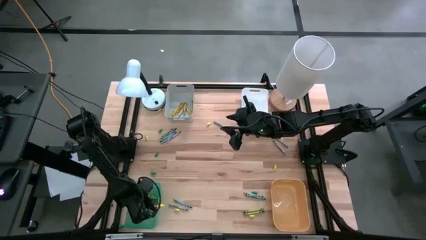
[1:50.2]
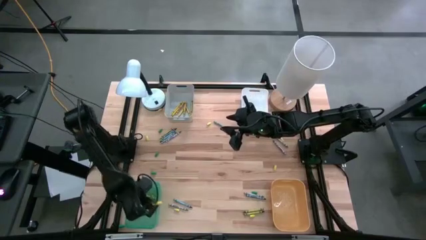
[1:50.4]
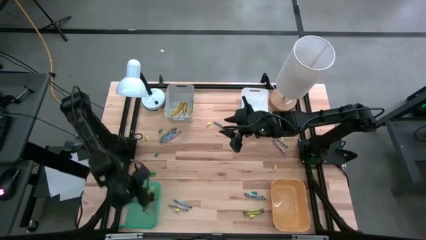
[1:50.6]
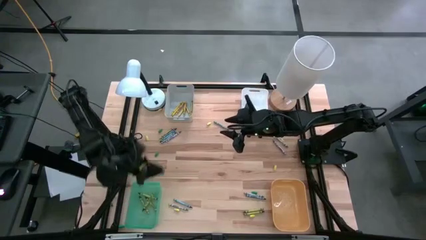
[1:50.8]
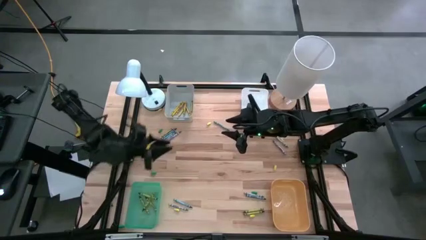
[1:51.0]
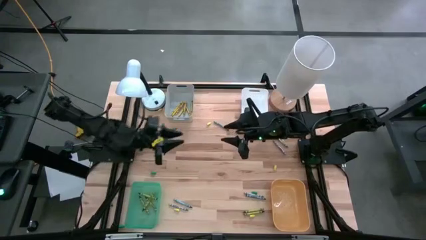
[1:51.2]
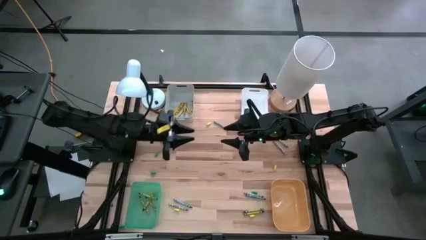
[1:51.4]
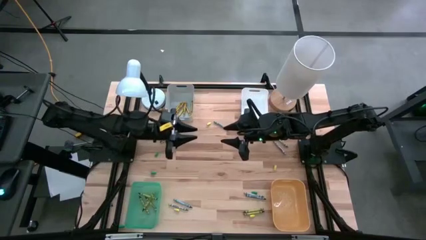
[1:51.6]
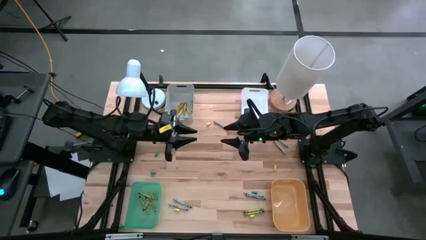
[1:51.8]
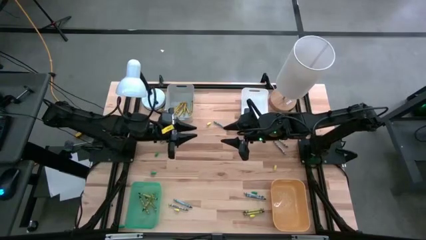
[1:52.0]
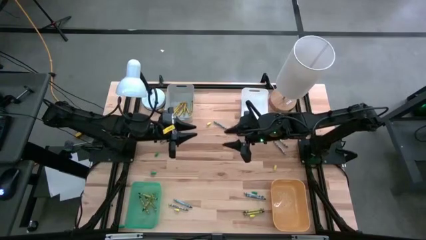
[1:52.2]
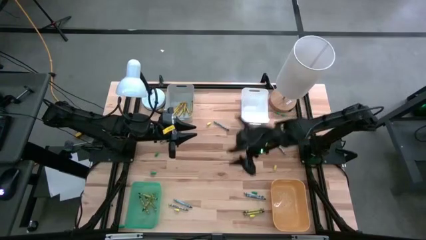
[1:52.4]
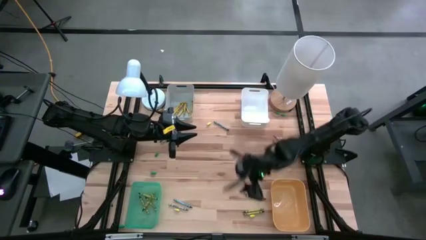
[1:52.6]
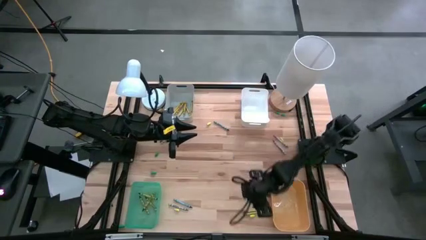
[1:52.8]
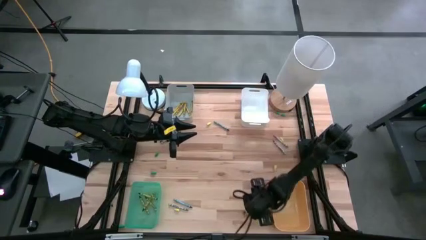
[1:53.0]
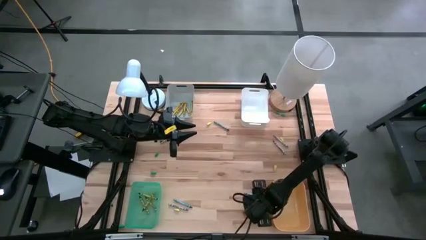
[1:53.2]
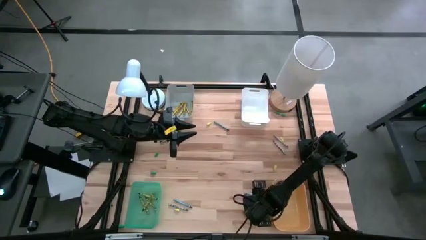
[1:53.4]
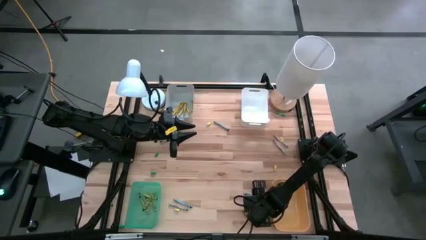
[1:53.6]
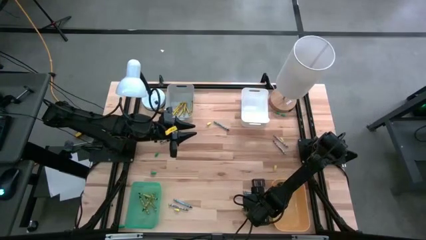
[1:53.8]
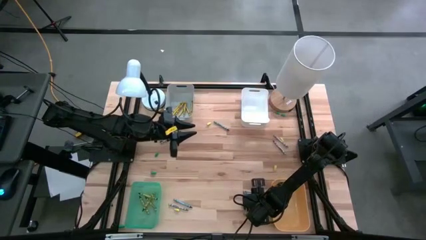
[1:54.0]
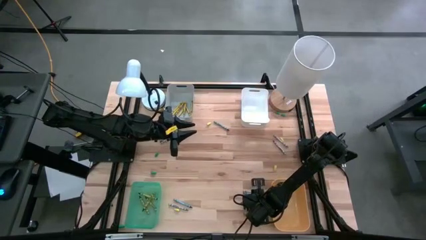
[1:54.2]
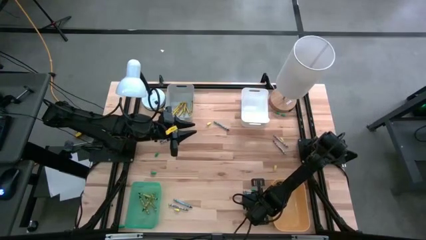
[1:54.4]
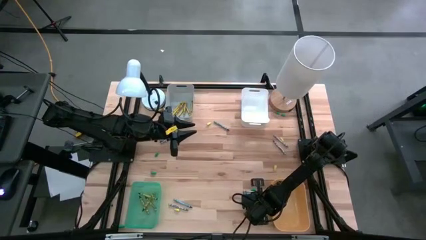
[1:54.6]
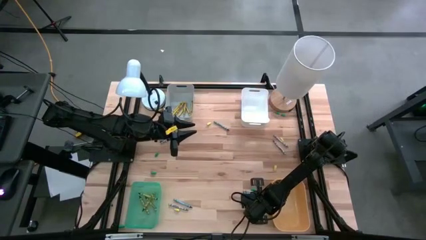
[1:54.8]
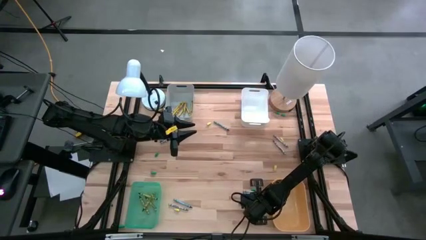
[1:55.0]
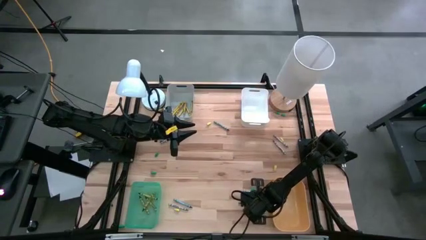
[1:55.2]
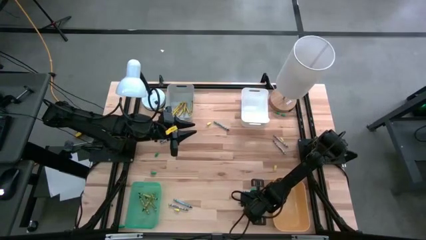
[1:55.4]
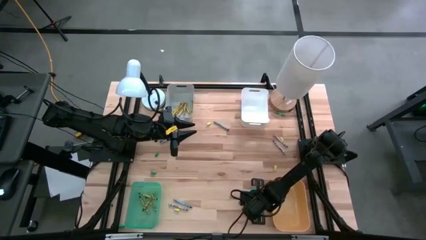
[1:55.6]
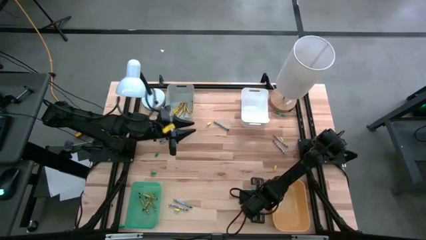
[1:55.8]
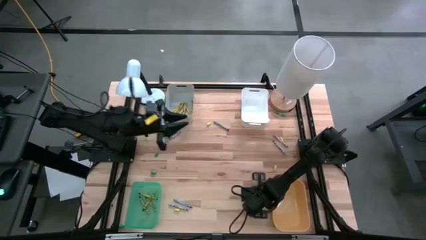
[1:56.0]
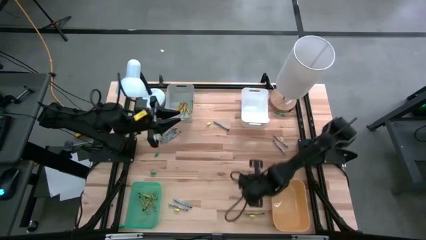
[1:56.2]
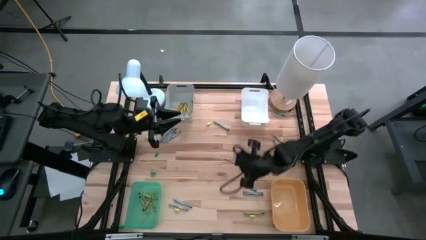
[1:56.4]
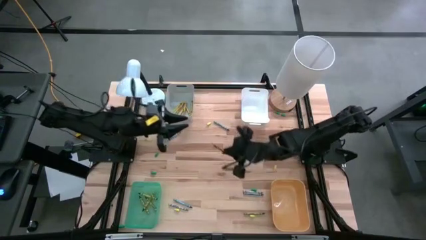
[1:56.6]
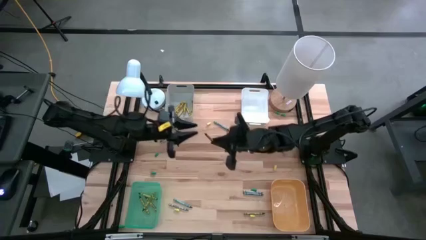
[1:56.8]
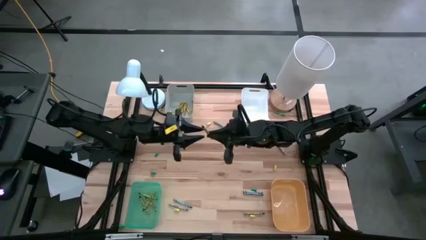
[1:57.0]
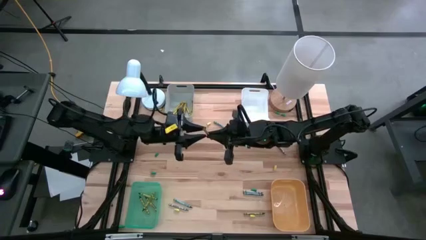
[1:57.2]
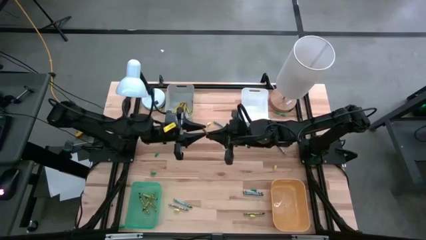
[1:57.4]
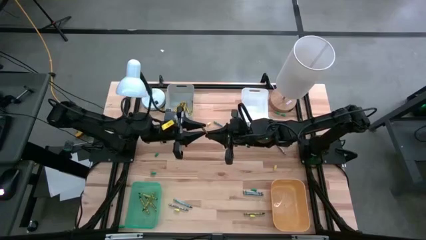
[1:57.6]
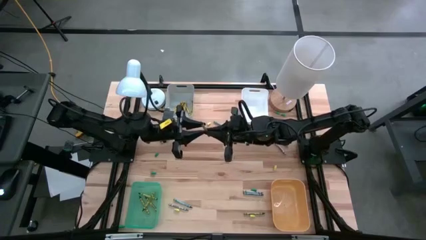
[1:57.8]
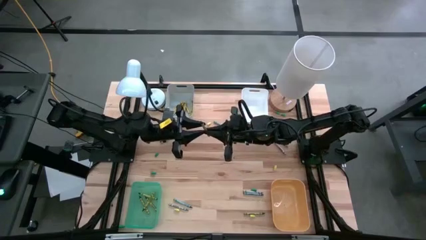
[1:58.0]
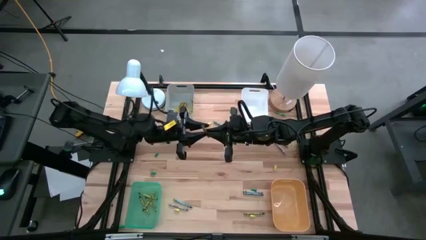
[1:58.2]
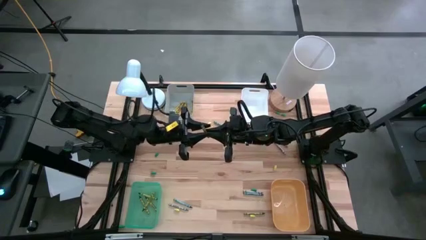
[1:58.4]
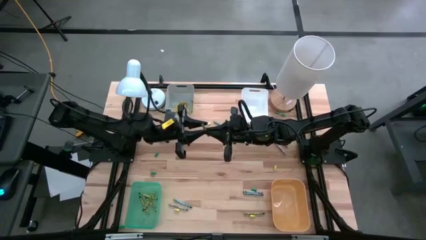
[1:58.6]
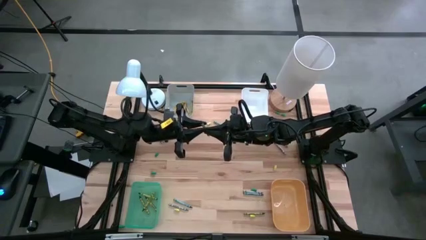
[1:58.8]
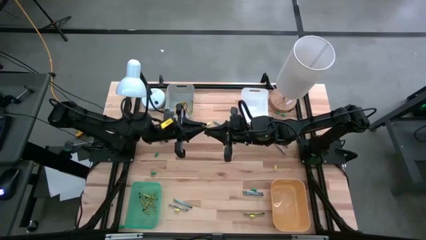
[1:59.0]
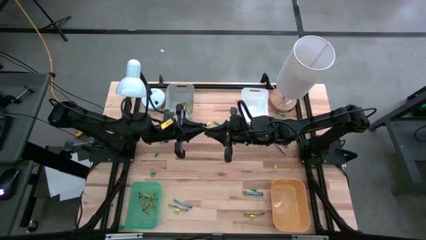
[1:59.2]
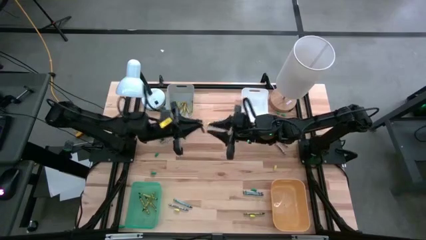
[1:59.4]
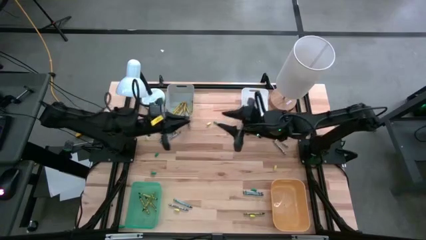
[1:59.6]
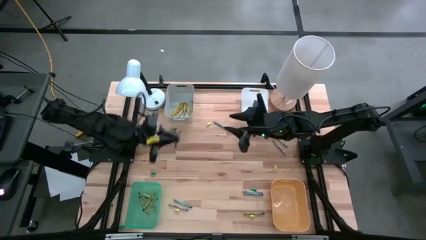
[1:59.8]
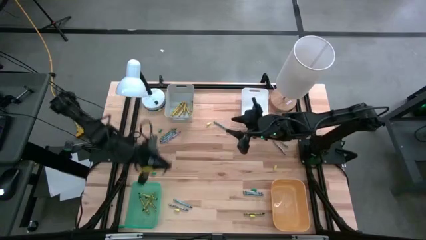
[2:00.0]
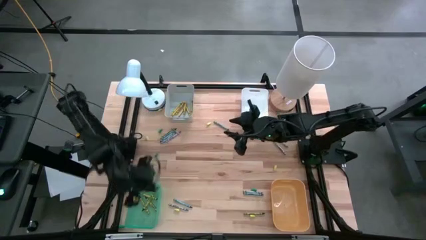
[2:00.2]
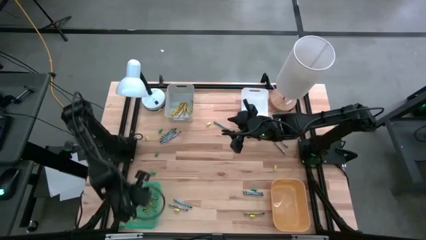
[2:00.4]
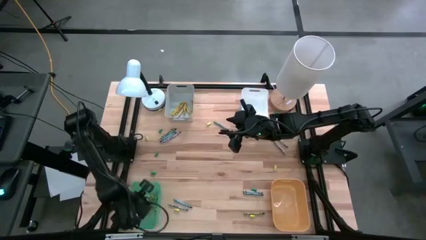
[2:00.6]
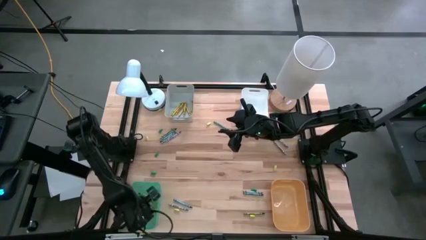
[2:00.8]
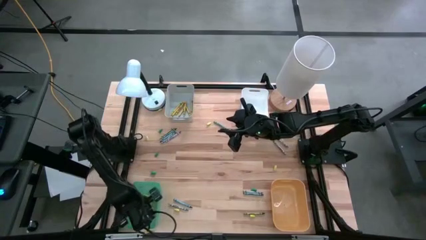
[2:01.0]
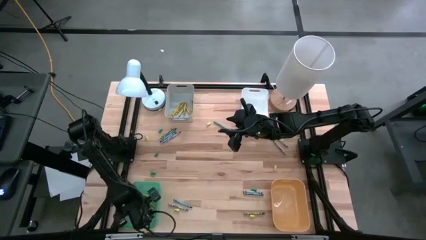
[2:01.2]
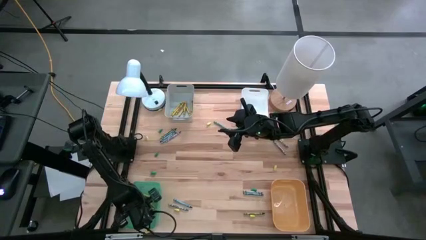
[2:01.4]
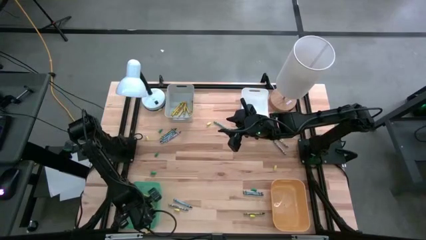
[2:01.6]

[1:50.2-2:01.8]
Task: Sort crayons
Put the green crayon into the green bin
